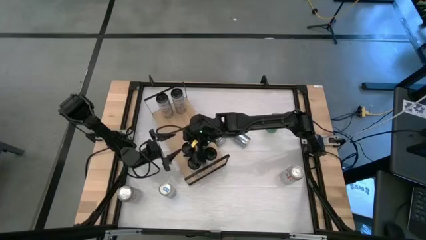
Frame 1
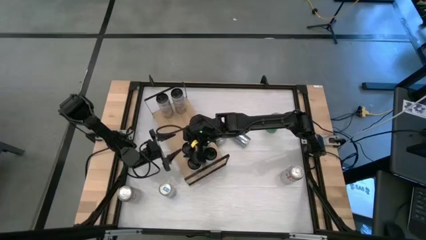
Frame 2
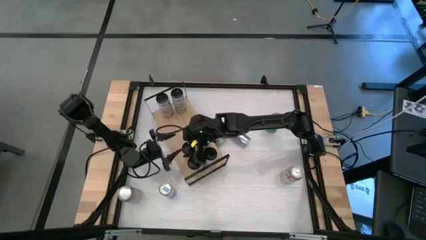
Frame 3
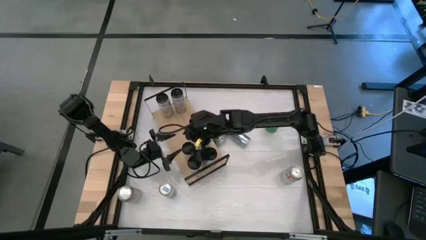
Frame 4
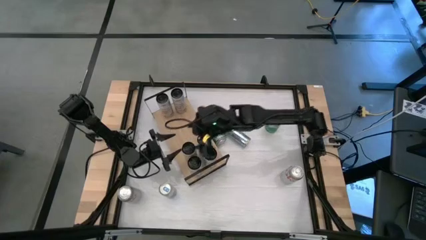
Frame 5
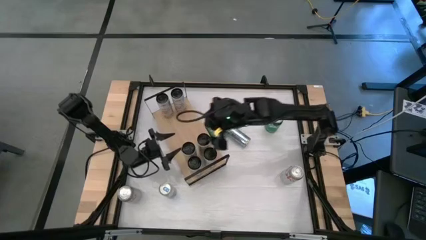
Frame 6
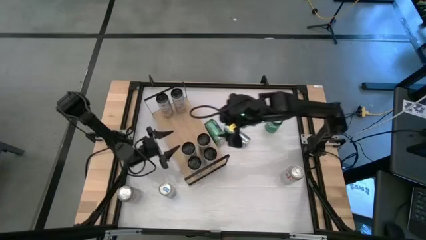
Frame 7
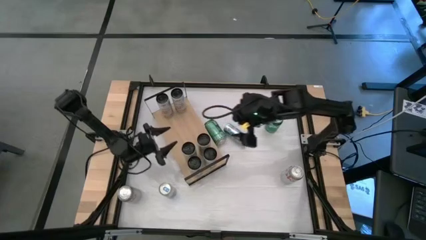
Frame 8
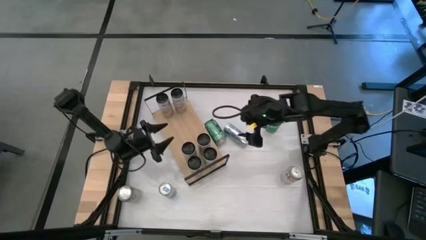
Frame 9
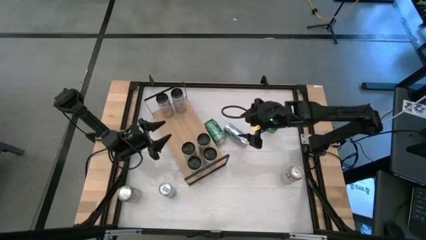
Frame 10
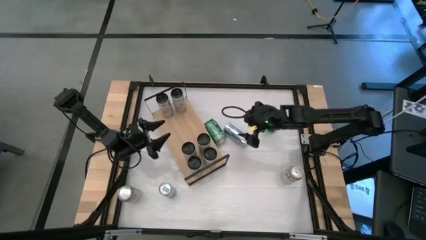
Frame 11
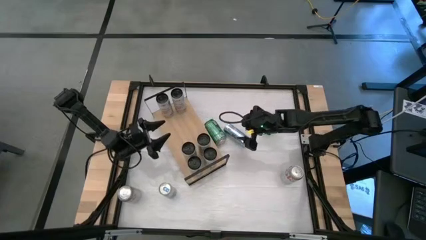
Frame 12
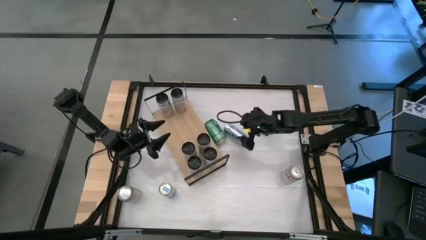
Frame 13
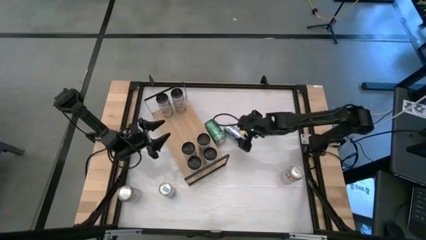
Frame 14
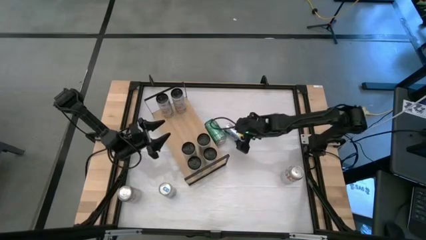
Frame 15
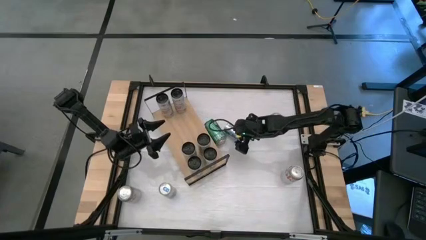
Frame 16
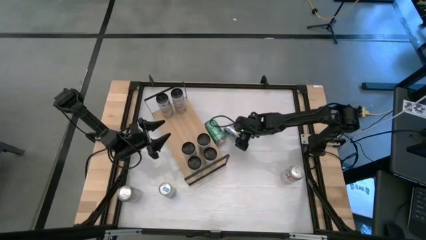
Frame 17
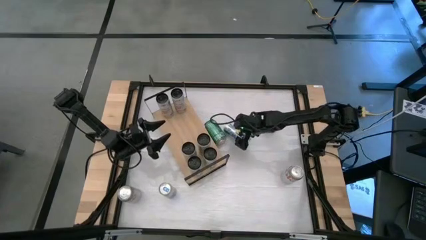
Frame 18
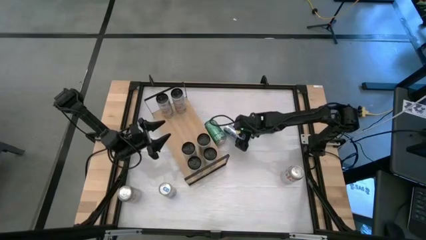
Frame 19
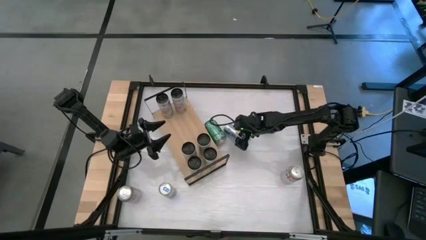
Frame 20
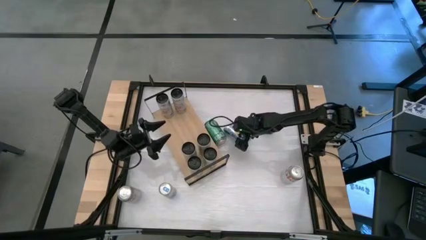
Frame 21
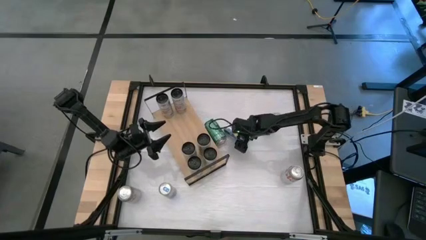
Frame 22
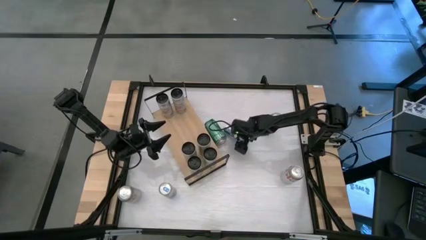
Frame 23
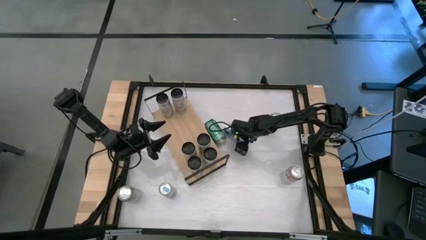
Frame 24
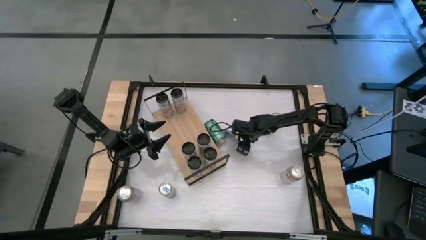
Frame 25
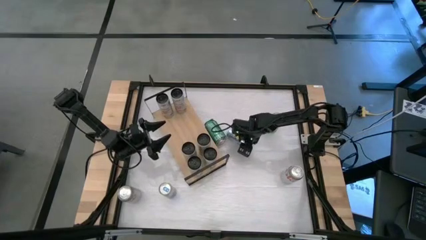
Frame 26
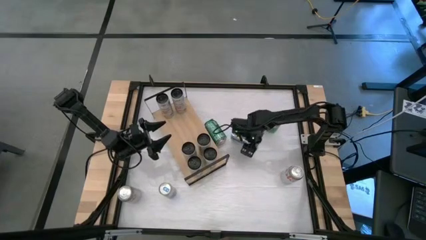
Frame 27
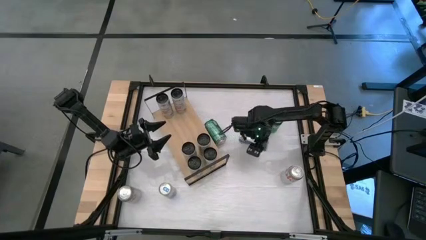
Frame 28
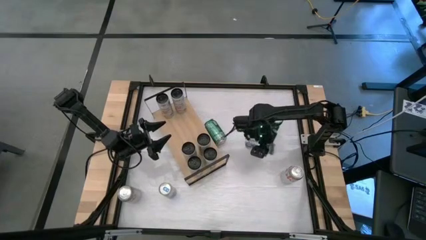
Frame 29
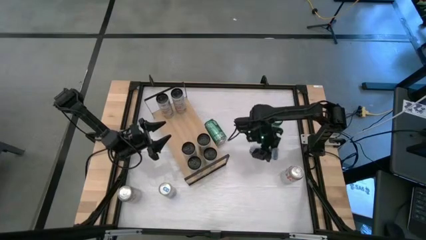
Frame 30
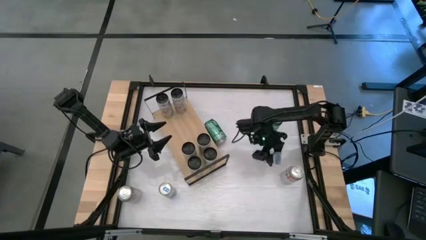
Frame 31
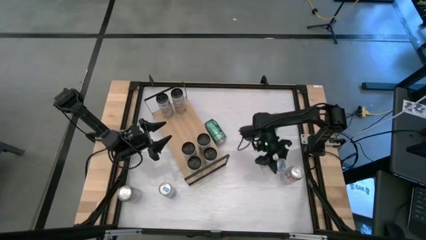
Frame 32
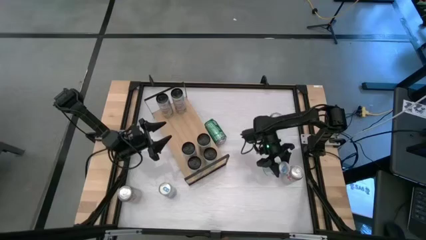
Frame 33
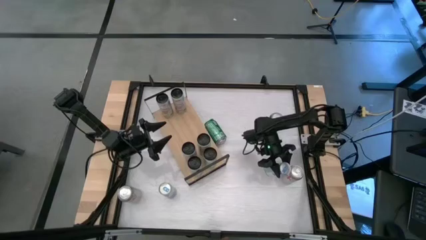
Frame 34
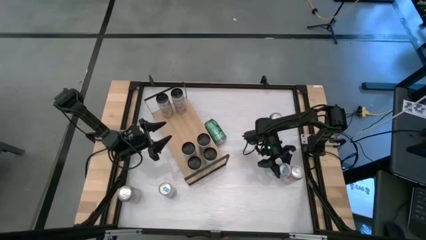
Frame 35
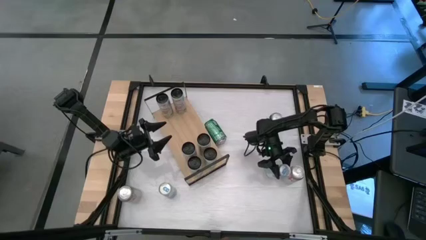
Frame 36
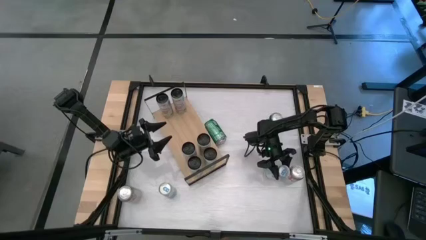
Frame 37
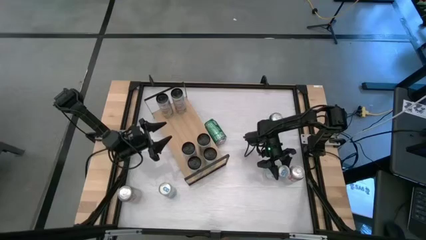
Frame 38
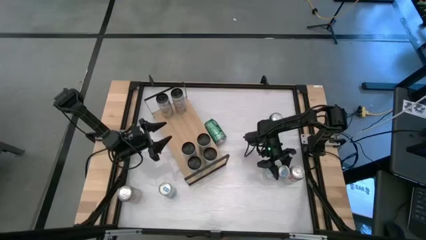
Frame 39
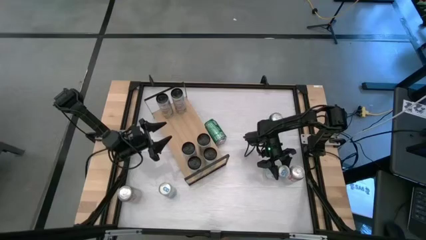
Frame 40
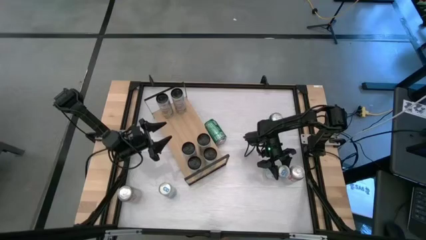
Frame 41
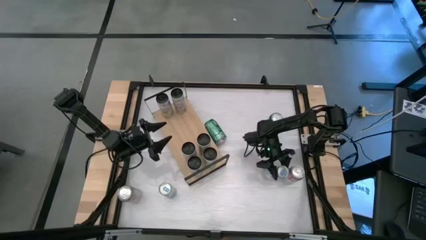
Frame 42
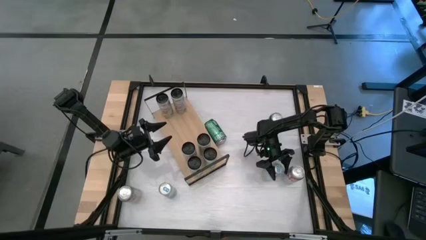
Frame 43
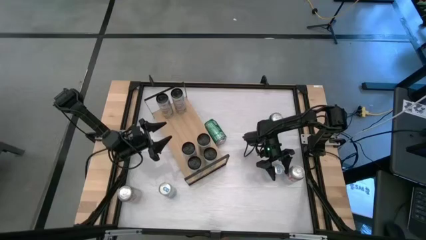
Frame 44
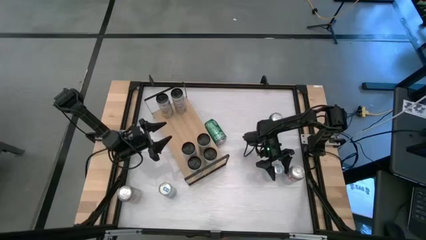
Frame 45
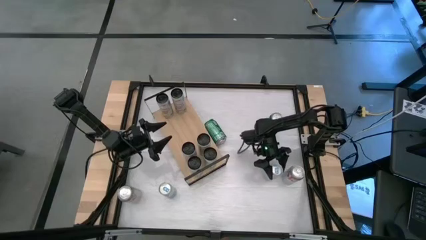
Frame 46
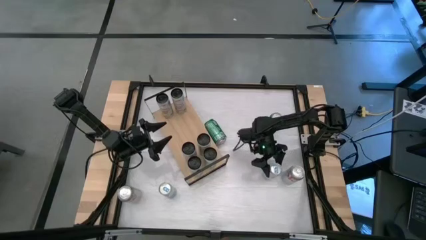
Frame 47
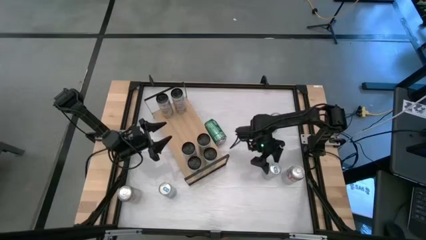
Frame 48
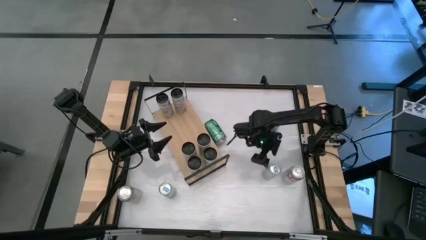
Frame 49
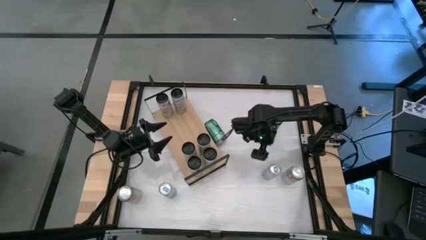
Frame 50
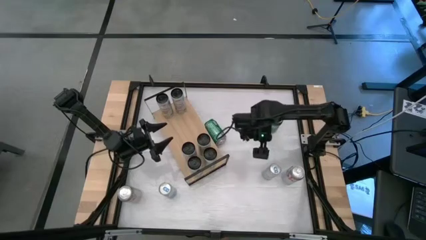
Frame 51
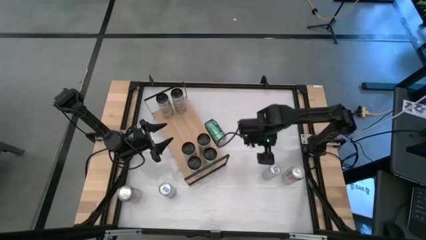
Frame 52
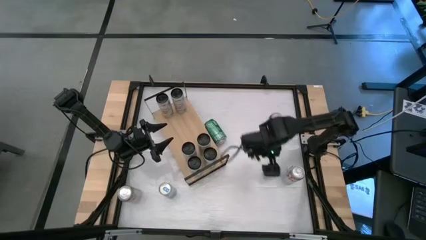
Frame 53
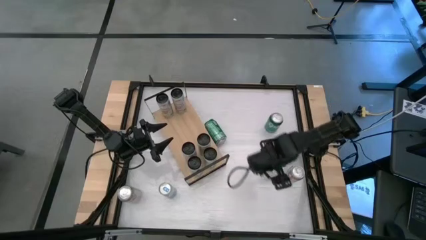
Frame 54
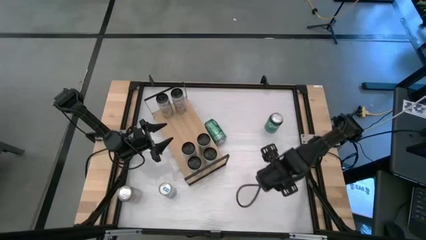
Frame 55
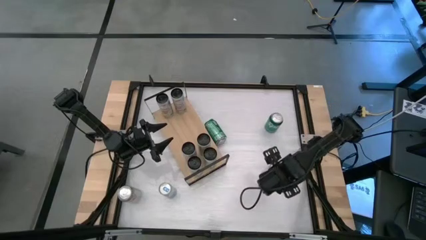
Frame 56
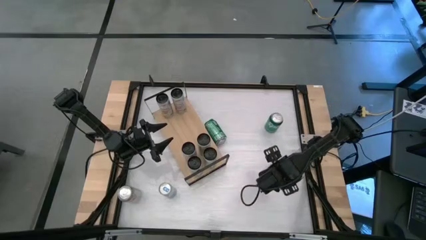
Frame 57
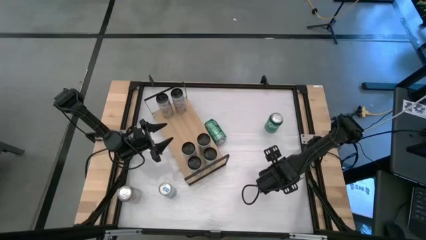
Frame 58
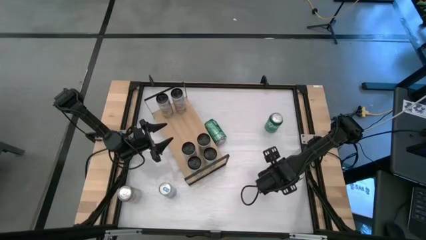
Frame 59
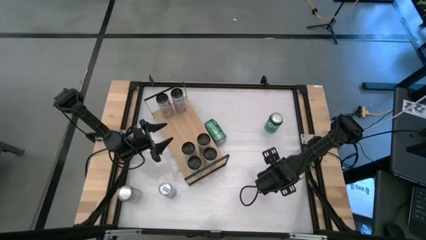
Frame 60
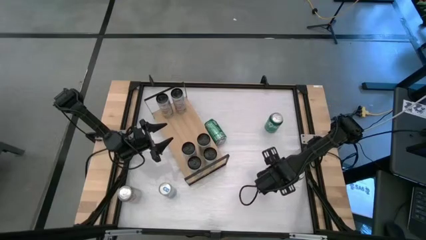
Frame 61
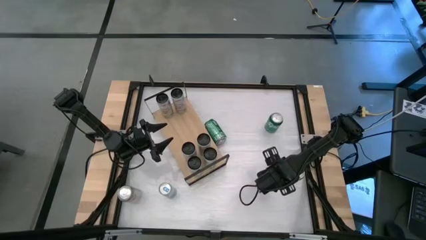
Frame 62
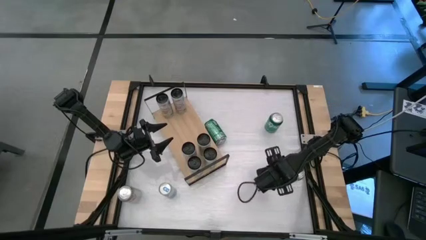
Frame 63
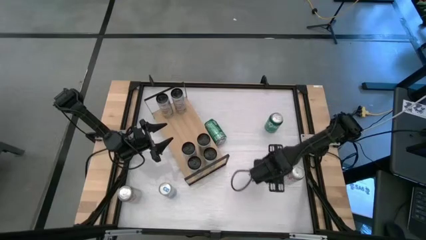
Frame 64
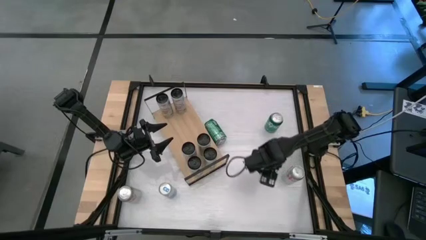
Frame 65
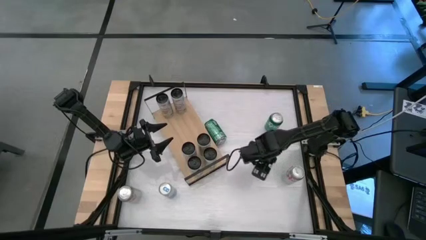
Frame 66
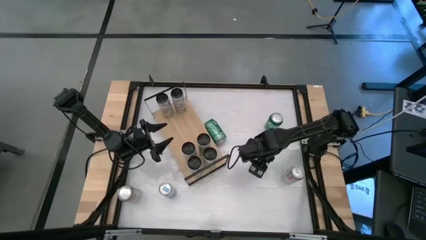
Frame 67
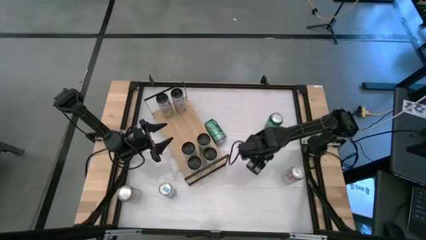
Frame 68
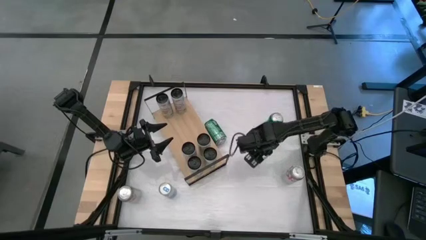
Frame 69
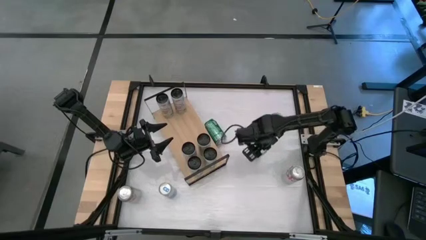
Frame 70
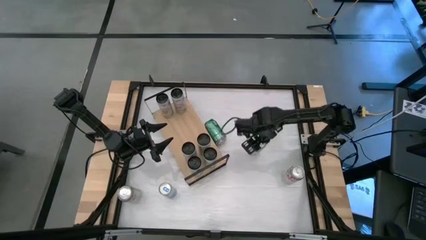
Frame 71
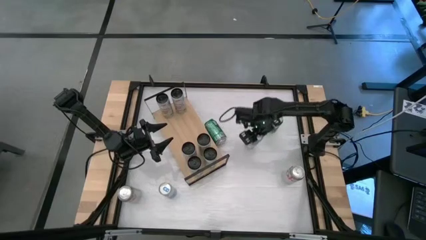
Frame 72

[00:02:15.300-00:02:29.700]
Task: Place canned beverage on shelf
Put the white blue soda can on the shelf
